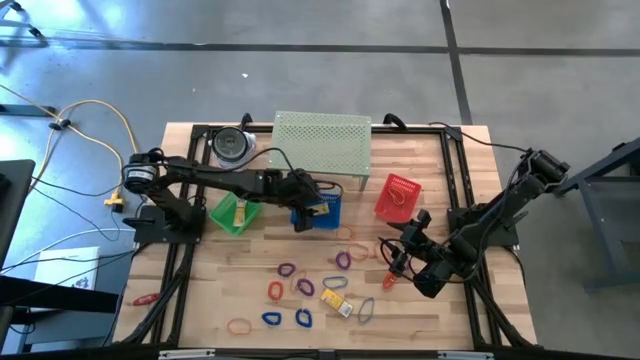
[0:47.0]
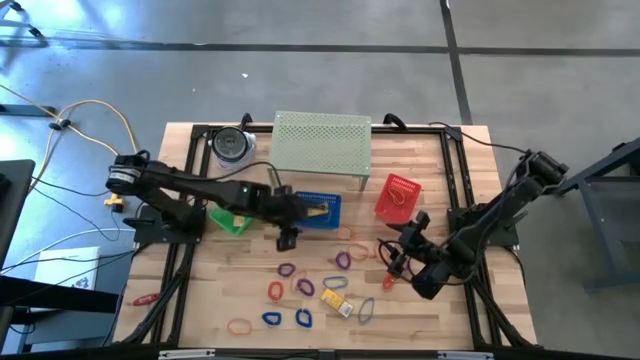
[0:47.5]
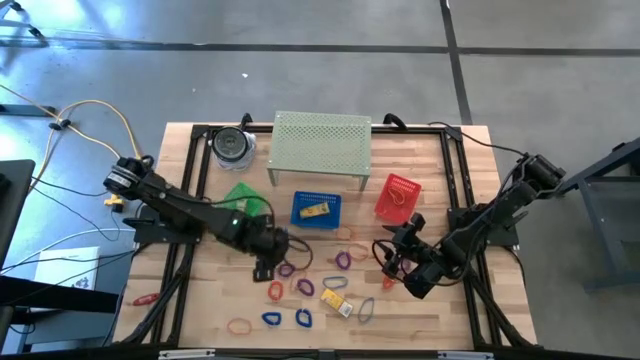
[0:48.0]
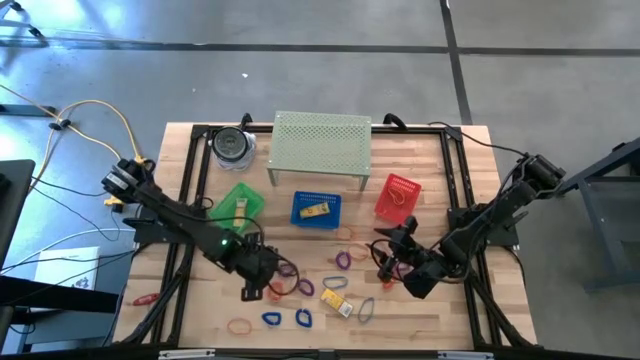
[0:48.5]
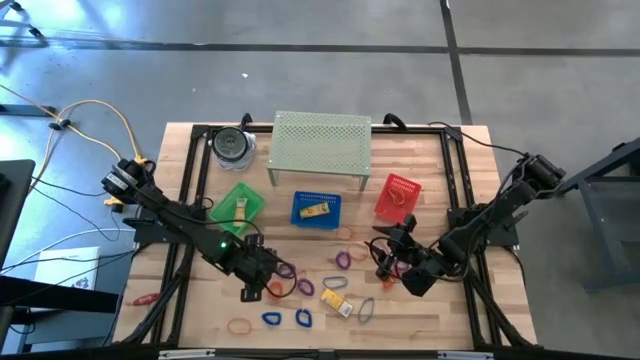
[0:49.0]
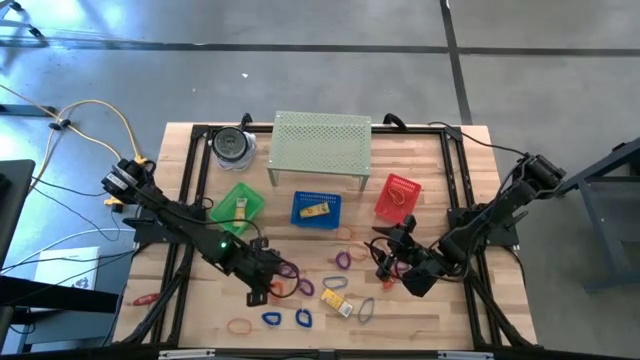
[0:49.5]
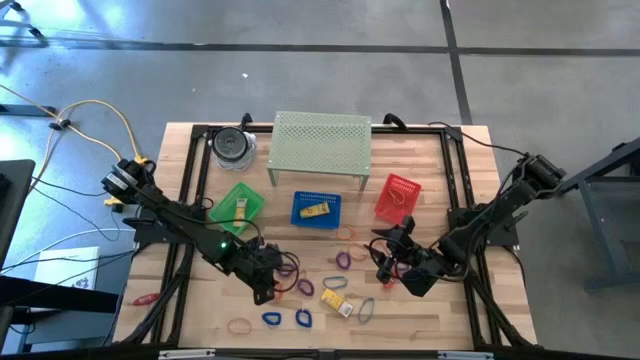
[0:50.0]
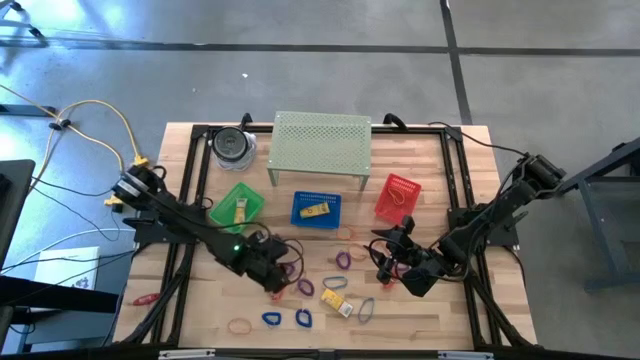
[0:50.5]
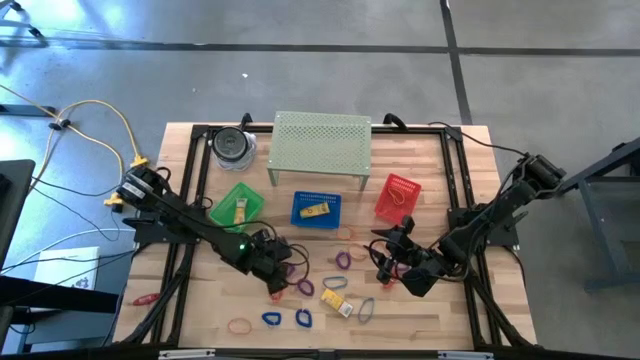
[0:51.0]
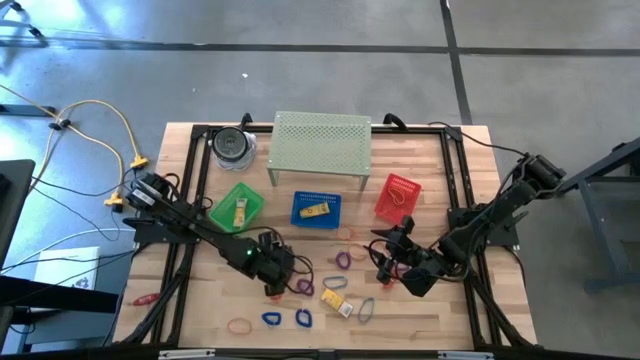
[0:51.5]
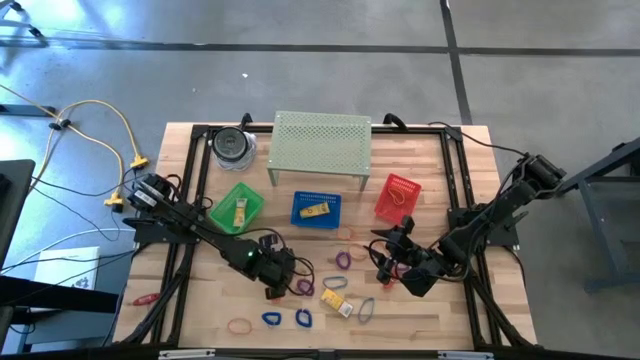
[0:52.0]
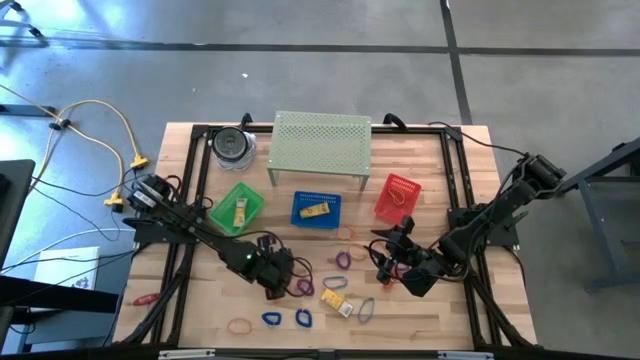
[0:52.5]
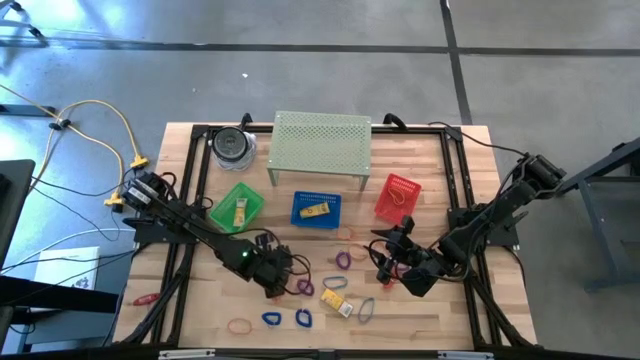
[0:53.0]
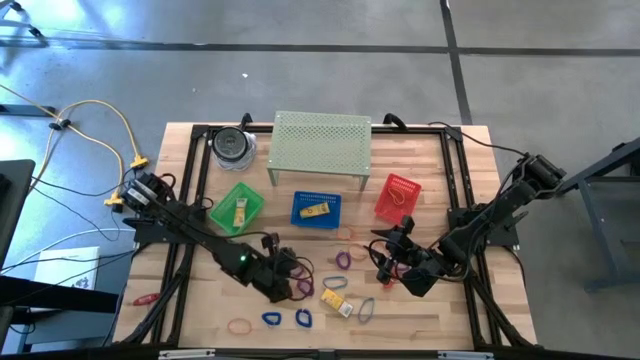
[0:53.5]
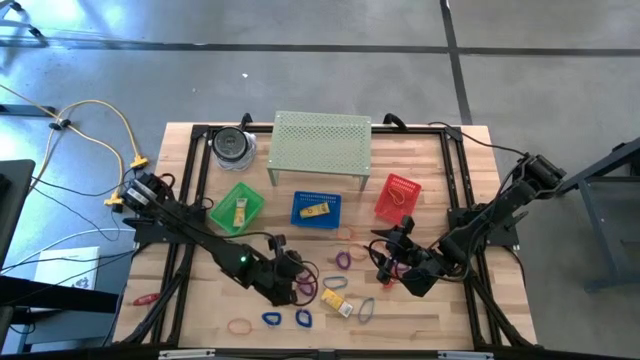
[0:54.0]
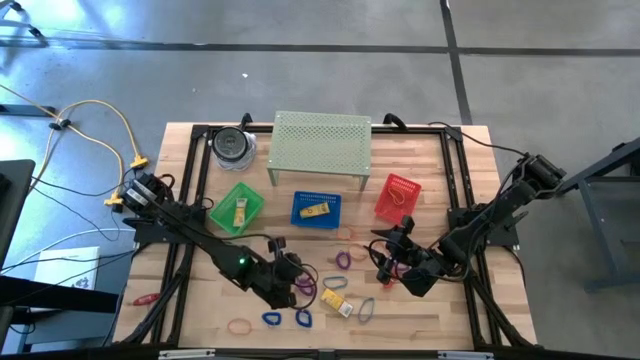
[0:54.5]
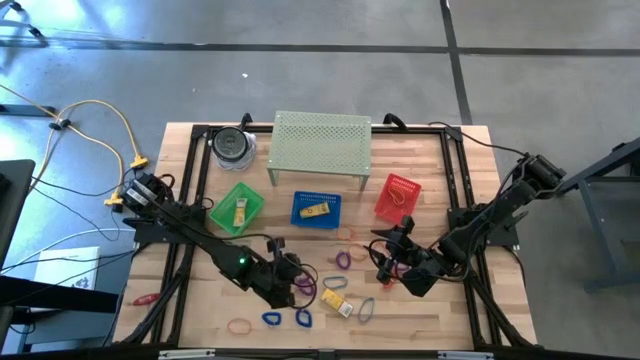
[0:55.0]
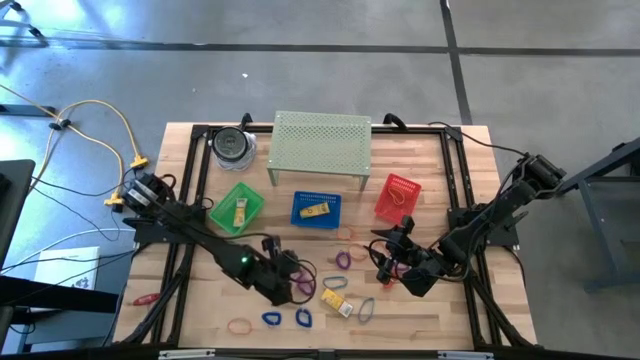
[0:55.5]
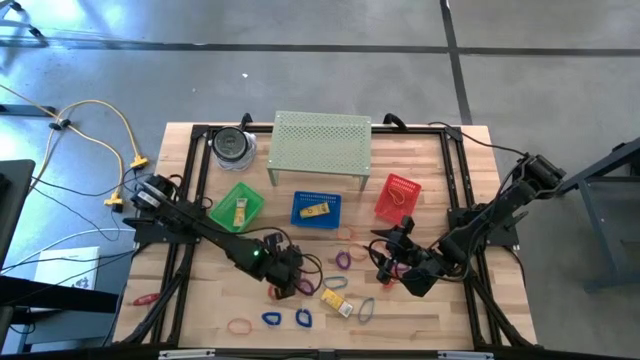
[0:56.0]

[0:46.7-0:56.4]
Task: Pick & Place Office Desk Supplies
Put the purple spring keychain into the green bin

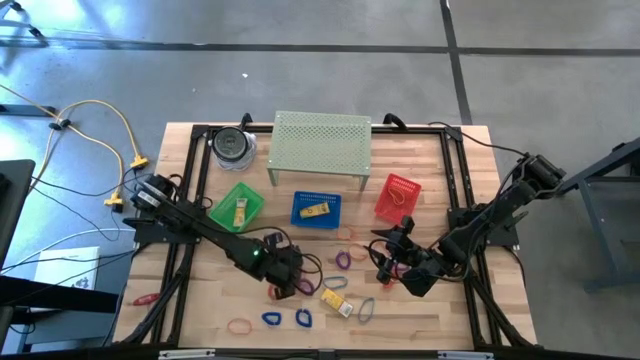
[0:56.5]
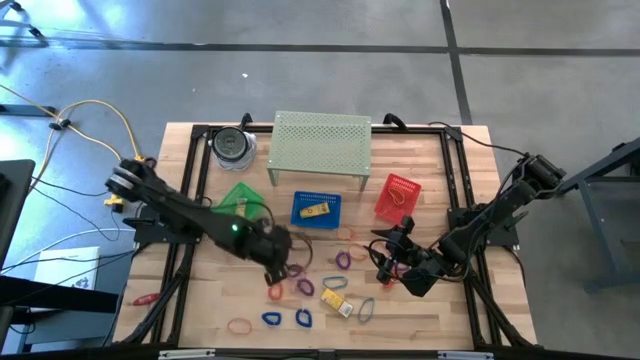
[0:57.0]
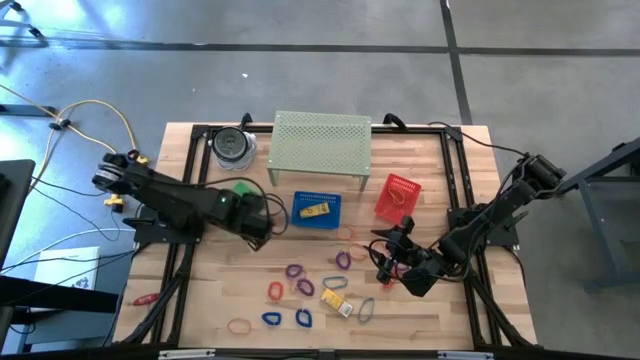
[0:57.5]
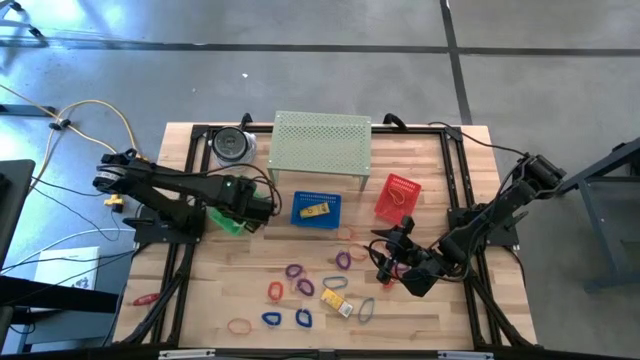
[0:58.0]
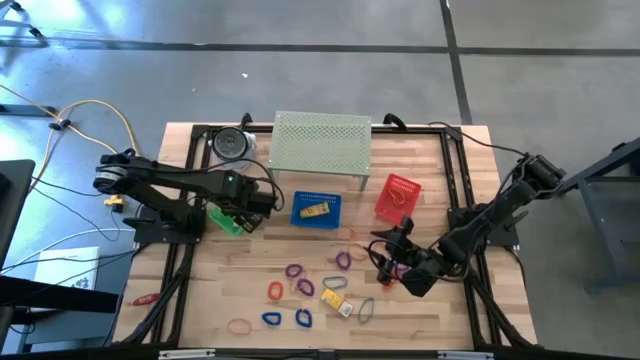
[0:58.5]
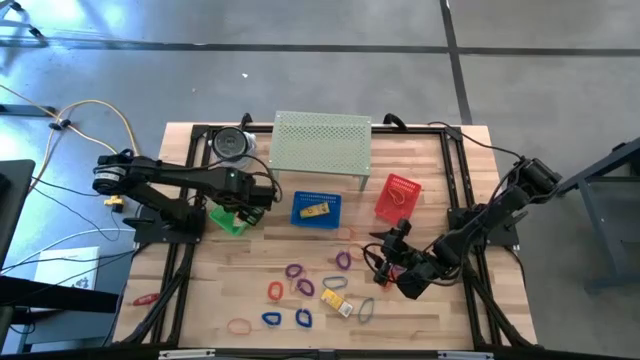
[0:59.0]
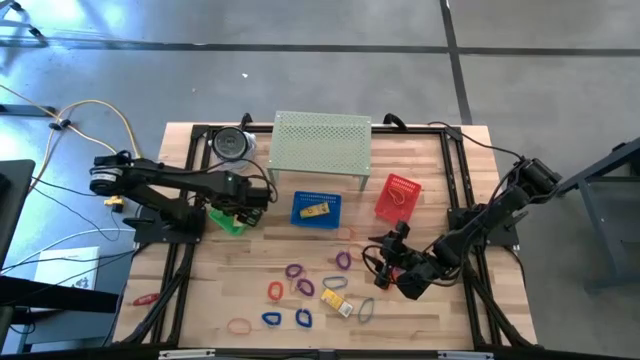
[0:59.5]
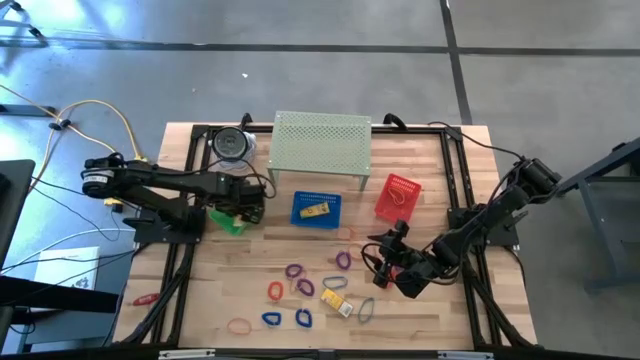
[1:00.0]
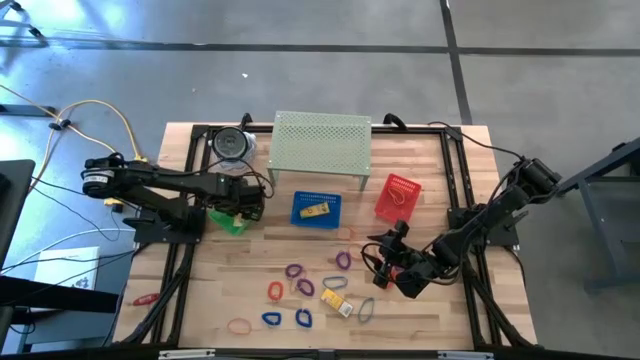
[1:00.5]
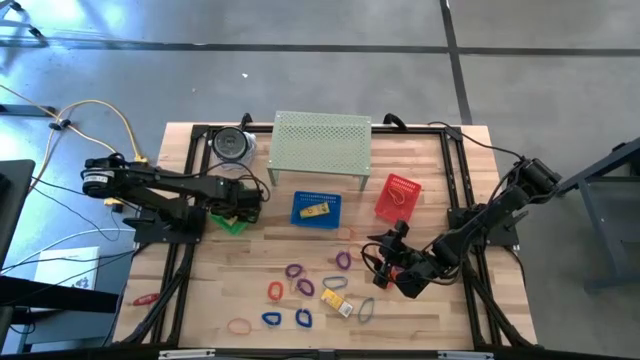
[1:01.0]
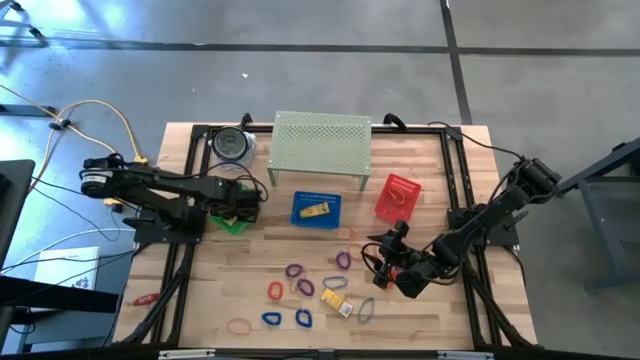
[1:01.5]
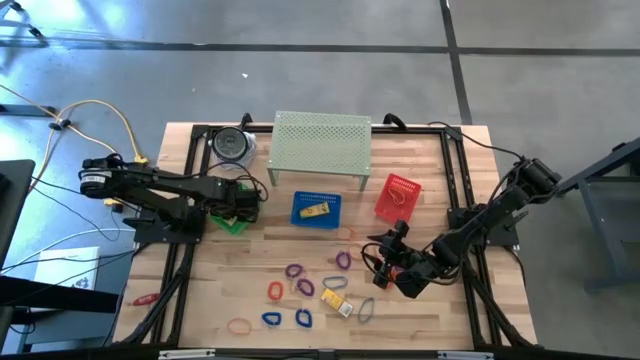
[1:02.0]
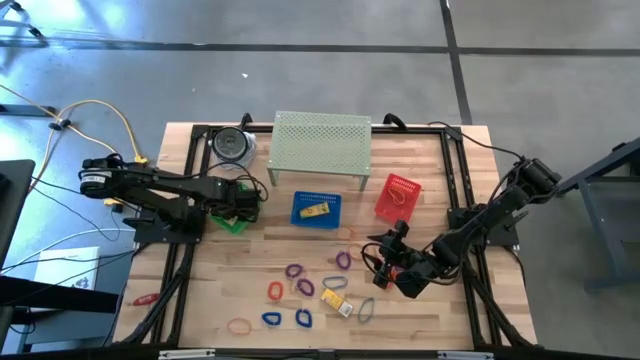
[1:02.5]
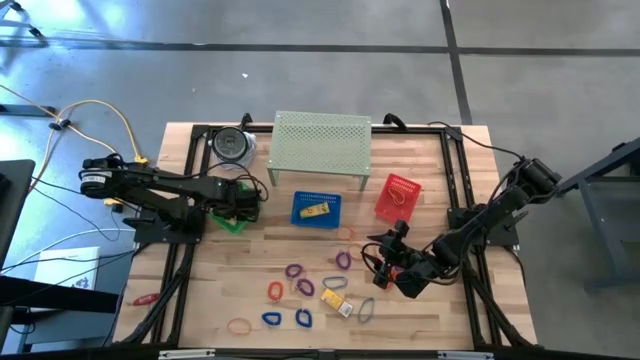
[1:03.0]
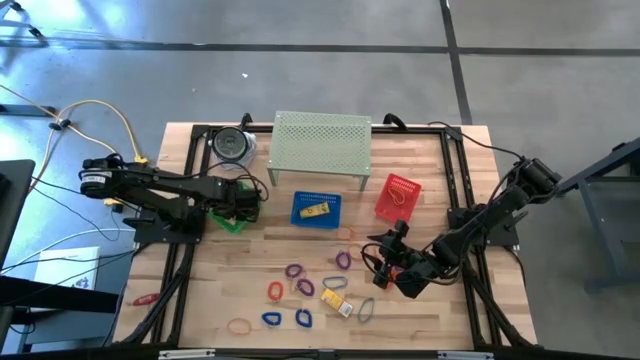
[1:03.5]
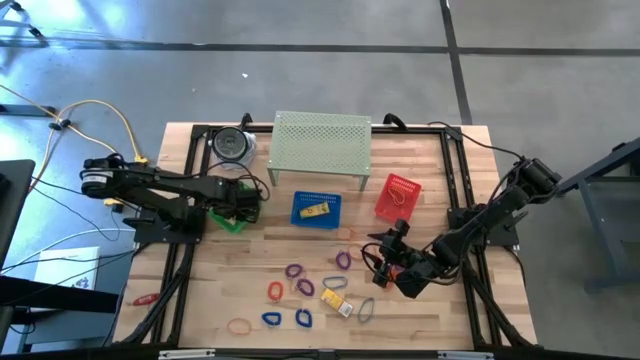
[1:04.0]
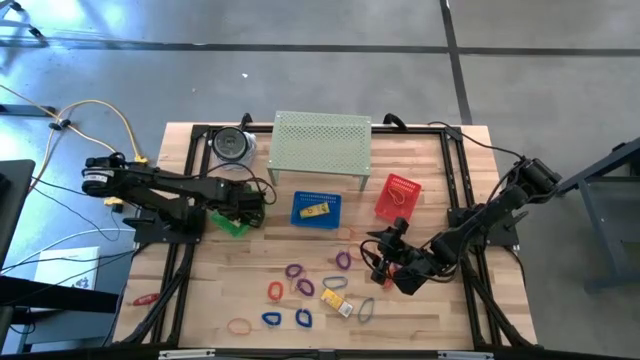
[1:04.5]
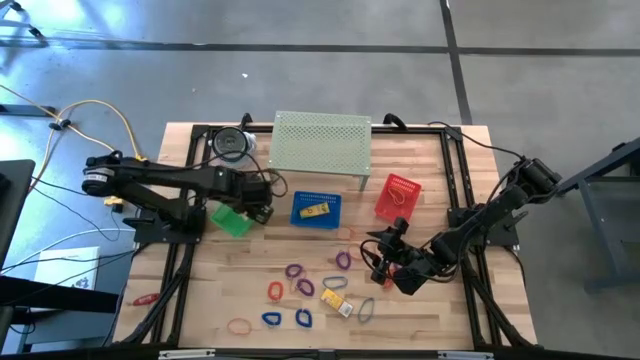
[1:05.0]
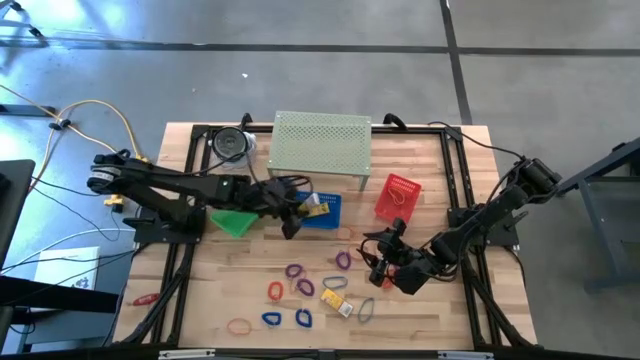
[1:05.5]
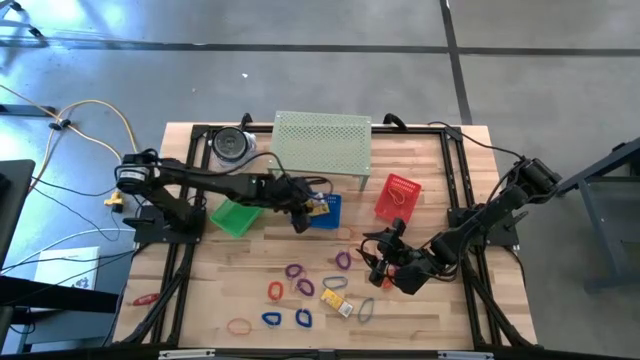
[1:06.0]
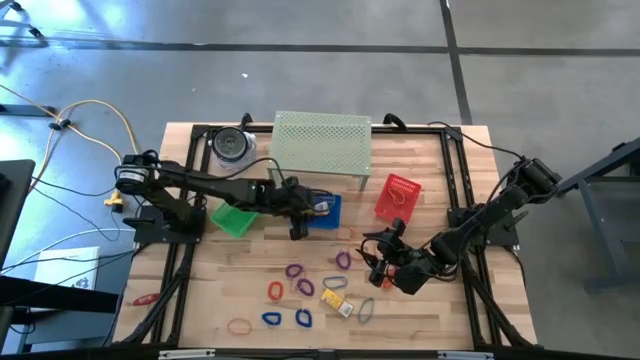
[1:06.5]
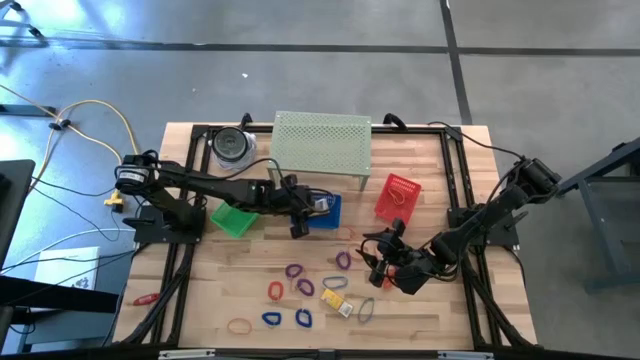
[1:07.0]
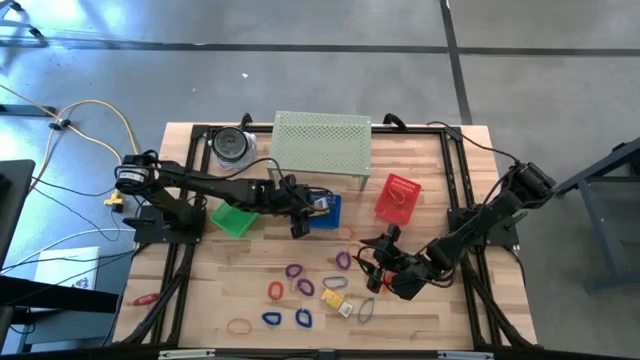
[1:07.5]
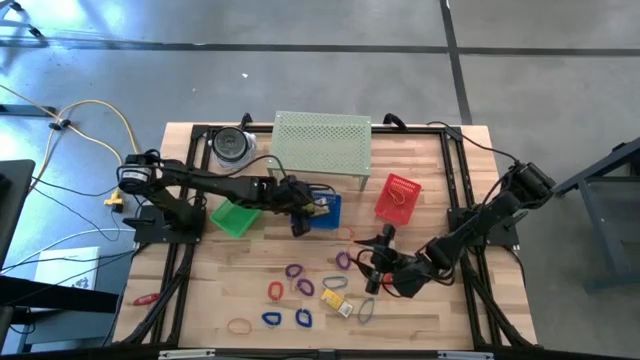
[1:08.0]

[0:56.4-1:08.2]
Put the crayon box from the green bin into the blue bin
